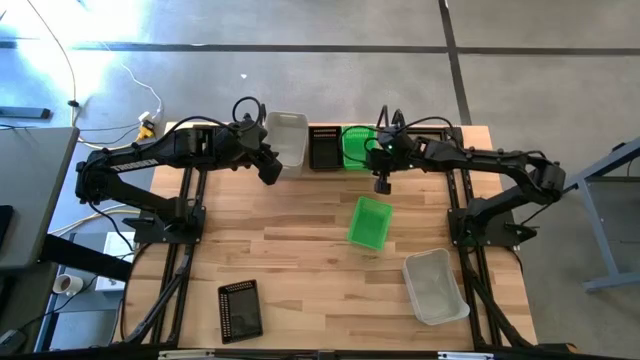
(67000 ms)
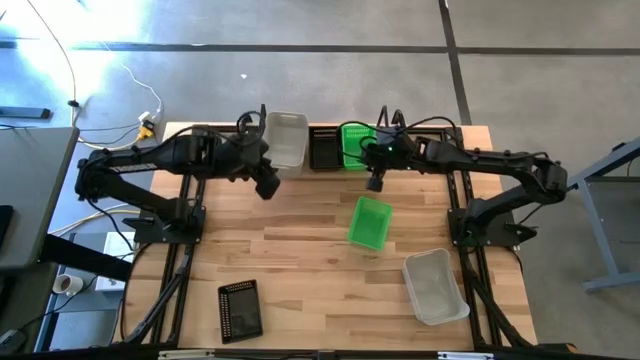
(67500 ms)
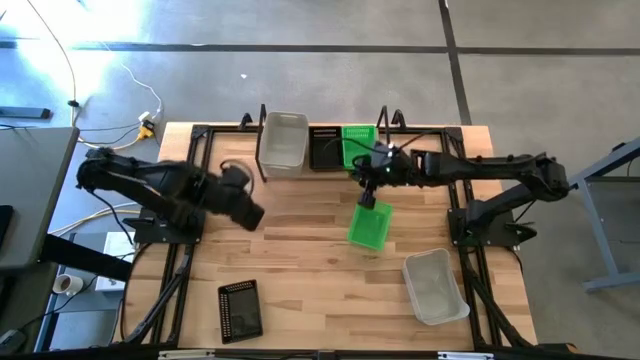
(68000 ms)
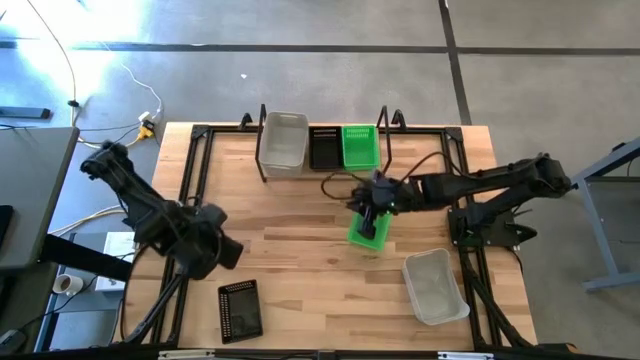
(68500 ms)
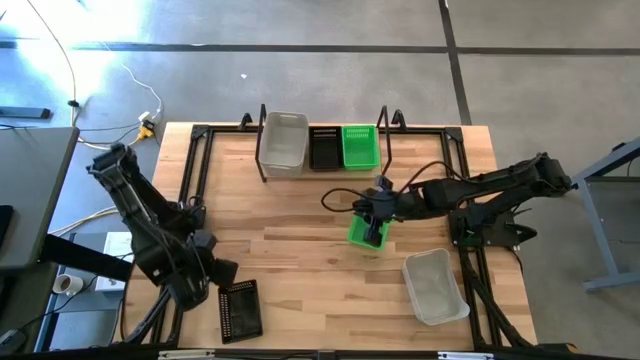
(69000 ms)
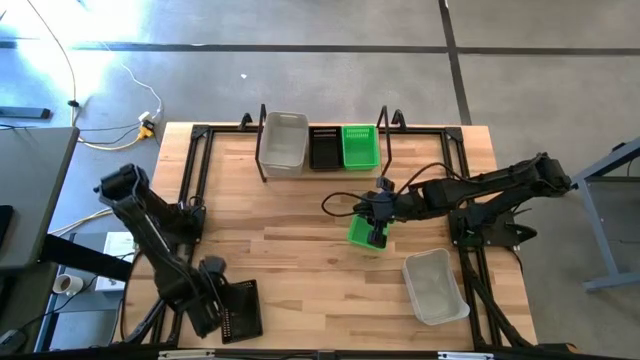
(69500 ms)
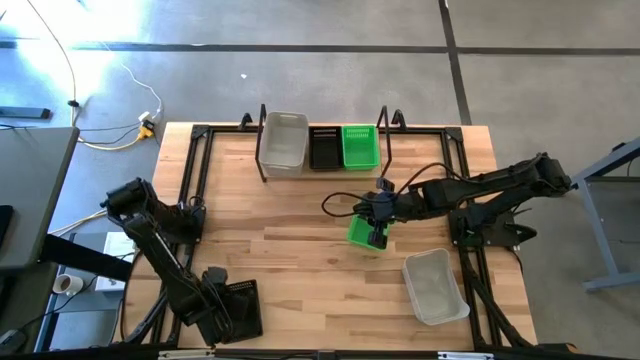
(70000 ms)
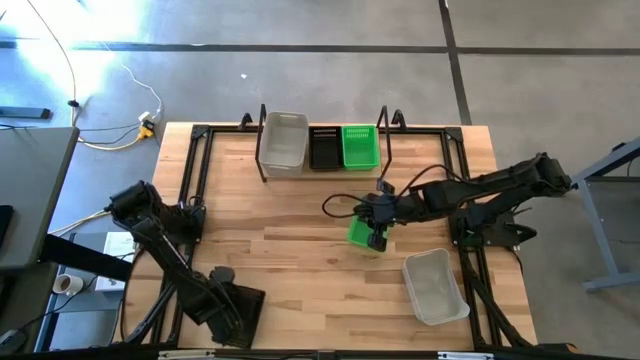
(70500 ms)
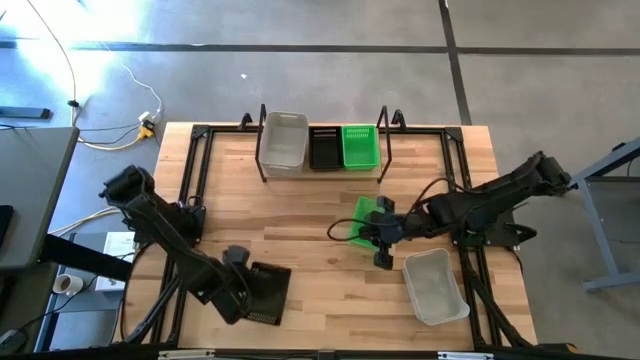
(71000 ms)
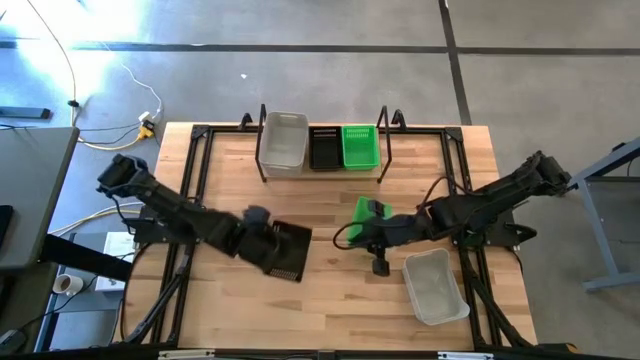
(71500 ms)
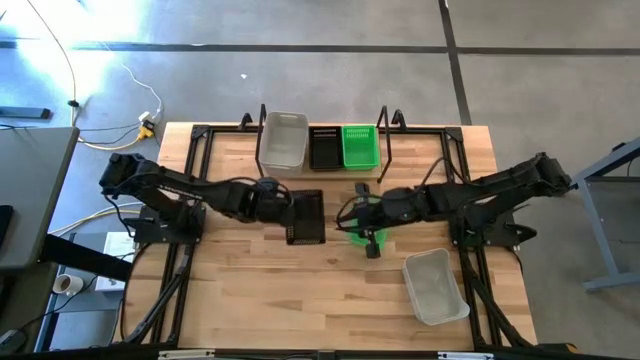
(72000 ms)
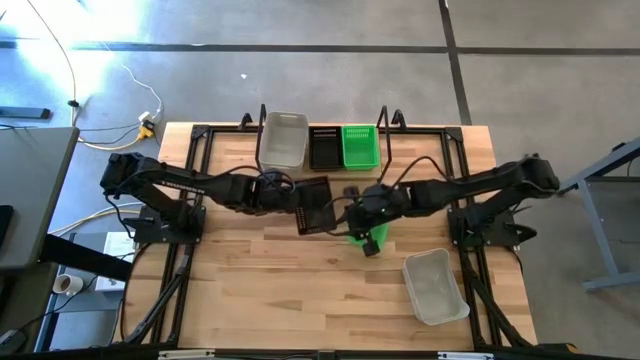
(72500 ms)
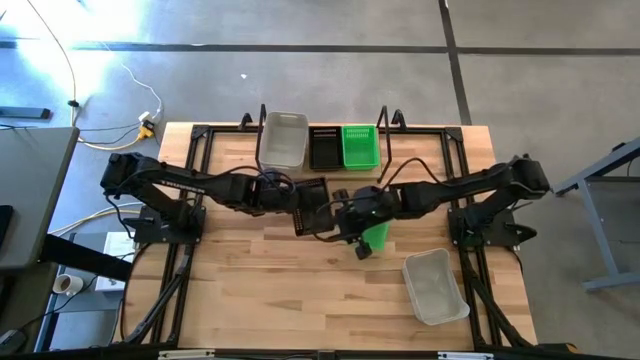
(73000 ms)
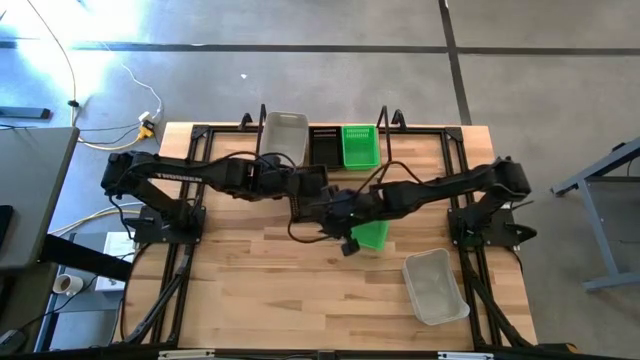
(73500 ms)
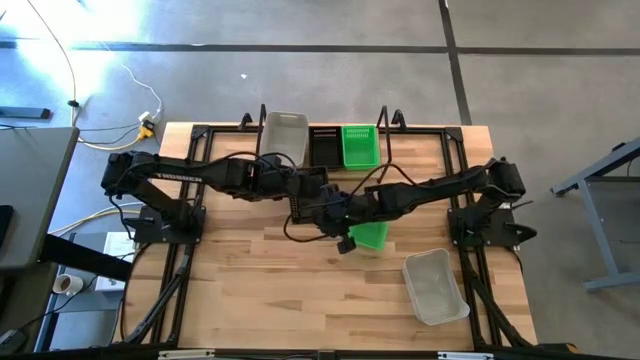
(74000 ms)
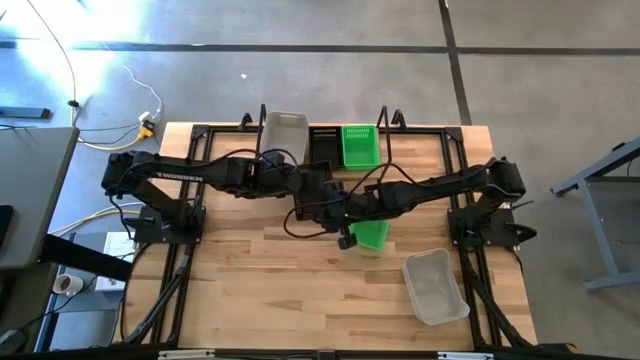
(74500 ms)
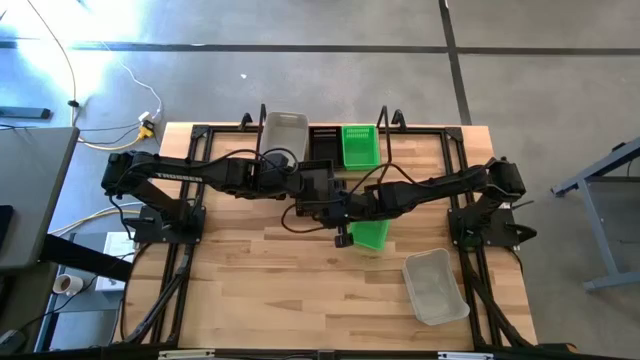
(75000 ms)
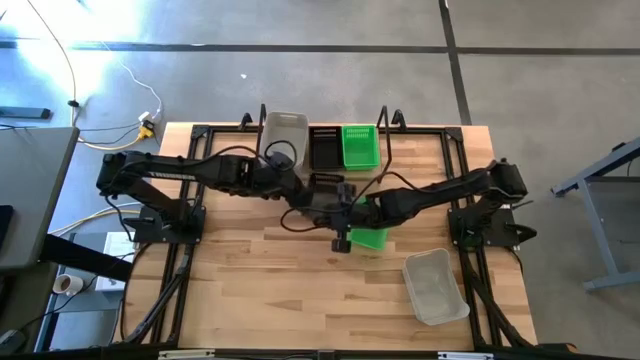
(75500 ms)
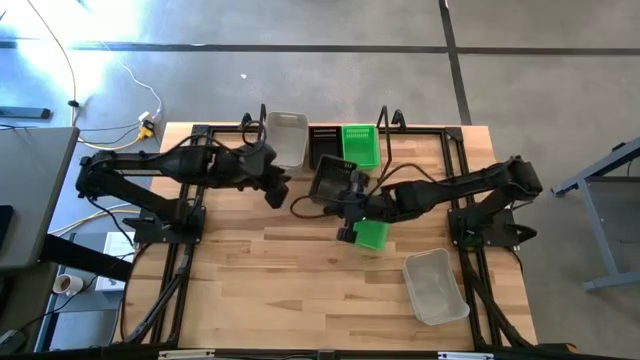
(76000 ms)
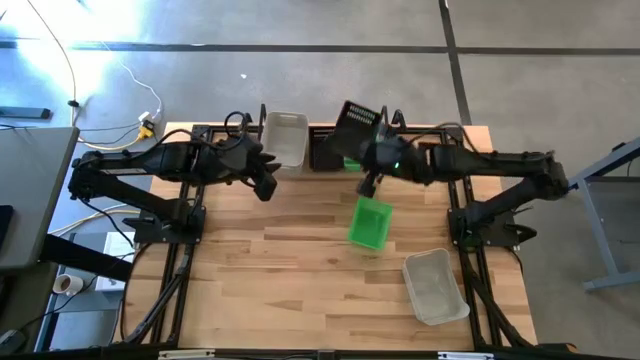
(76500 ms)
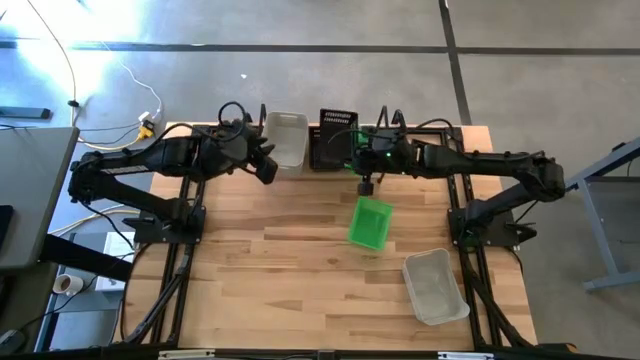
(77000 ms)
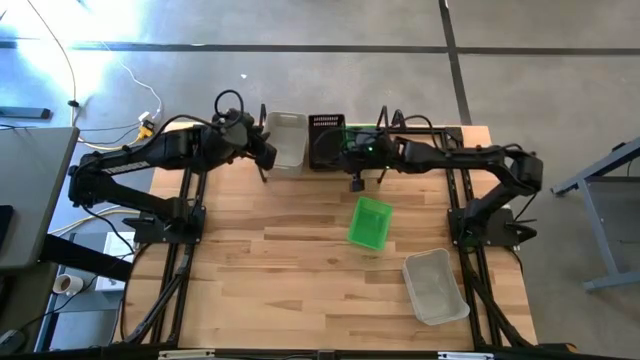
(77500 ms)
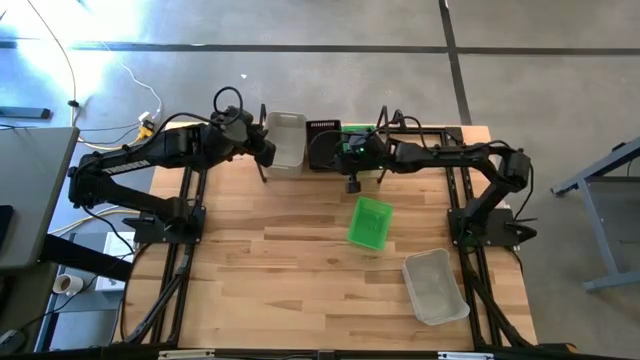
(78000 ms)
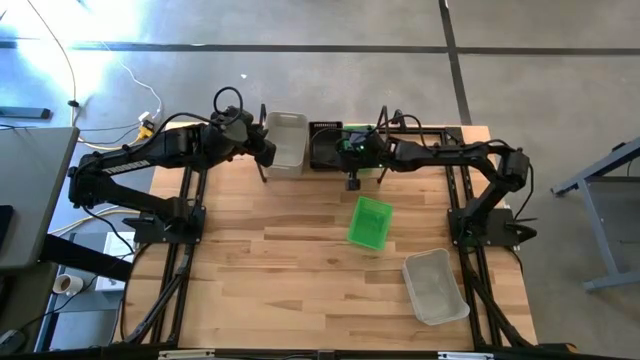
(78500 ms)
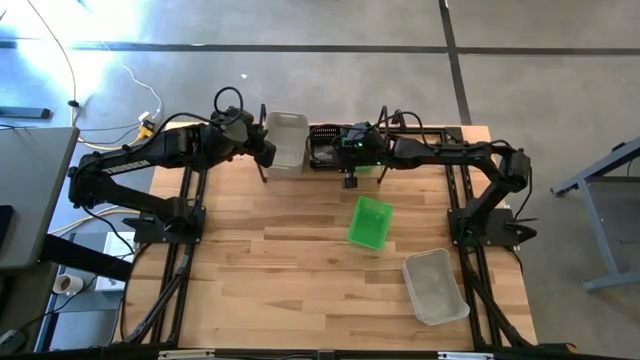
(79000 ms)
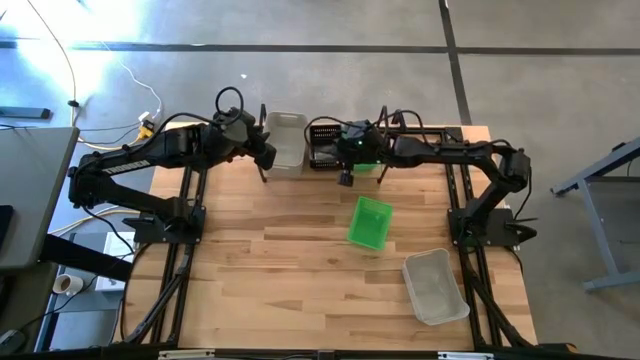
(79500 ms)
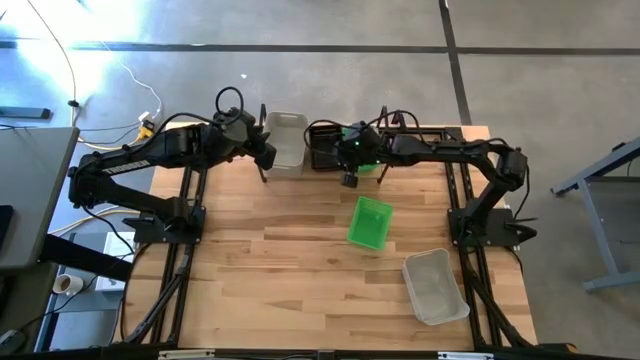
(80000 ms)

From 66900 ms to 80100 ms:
Task: Stack baskets on shelf by color
Stack the black bin on the black bins on the shelf

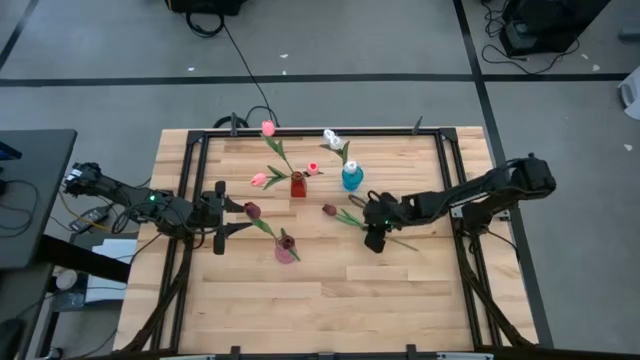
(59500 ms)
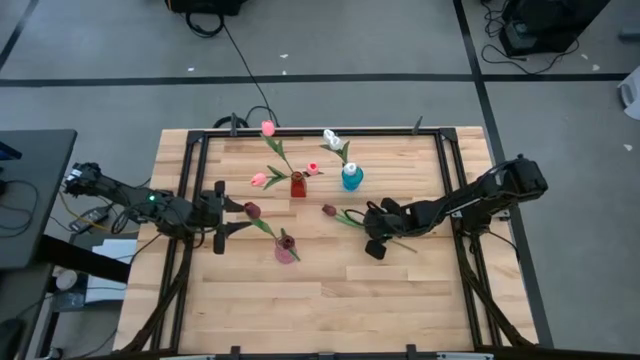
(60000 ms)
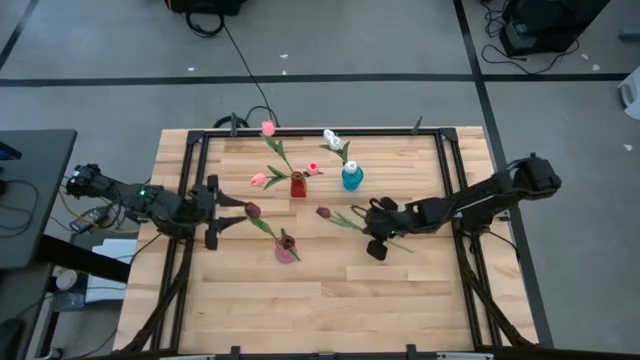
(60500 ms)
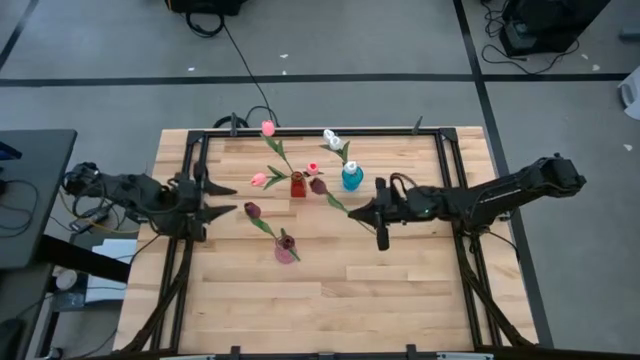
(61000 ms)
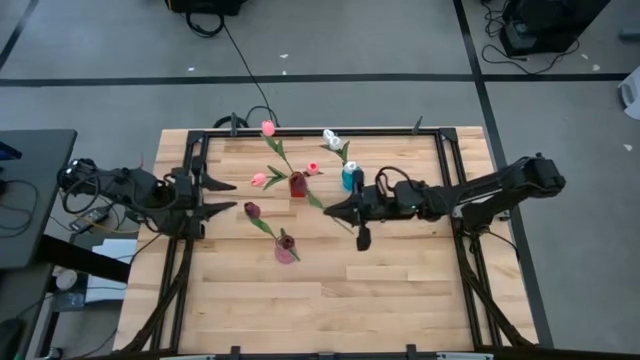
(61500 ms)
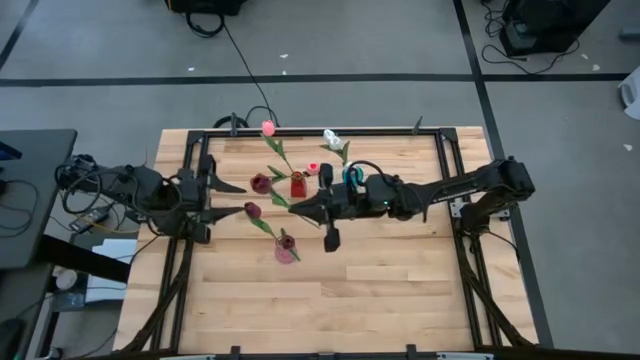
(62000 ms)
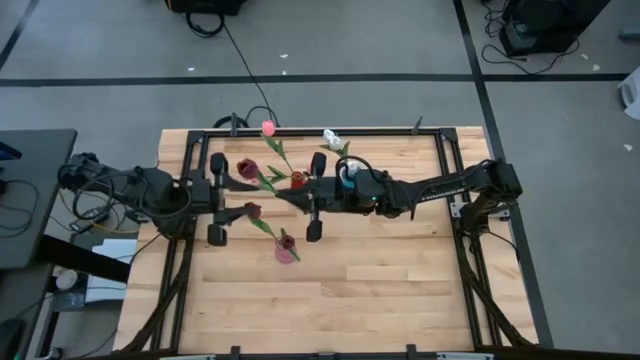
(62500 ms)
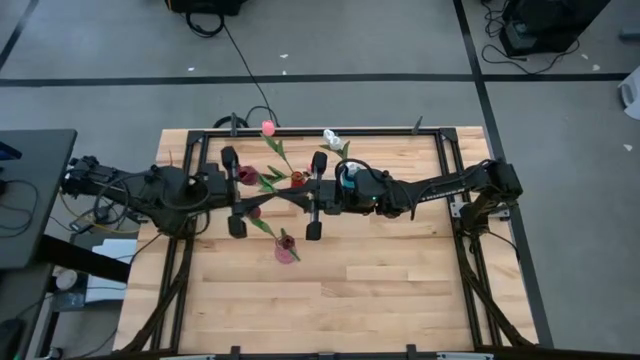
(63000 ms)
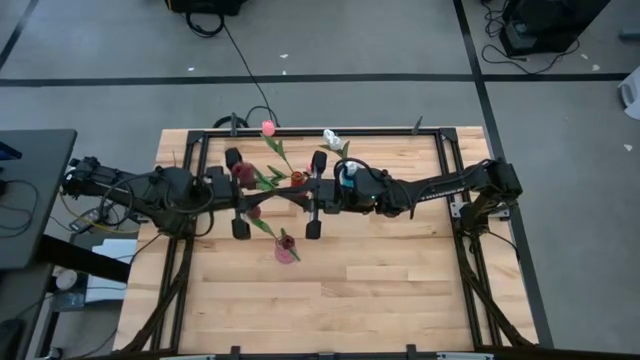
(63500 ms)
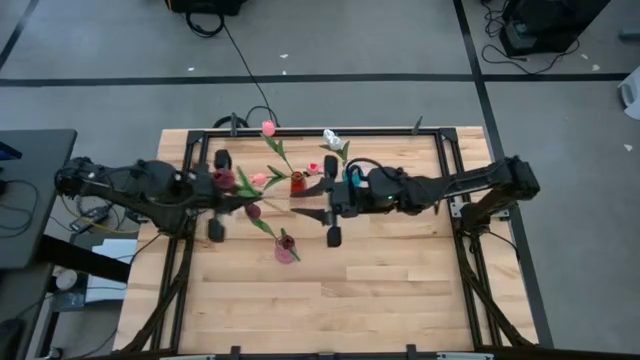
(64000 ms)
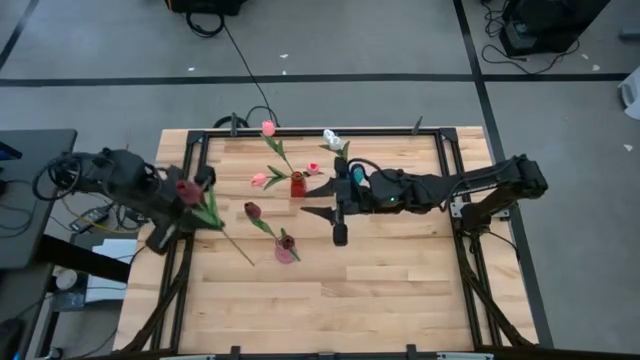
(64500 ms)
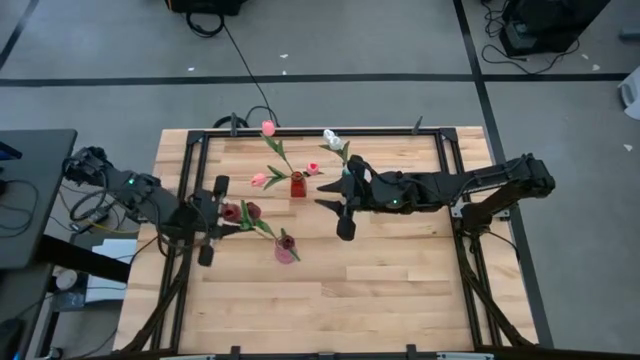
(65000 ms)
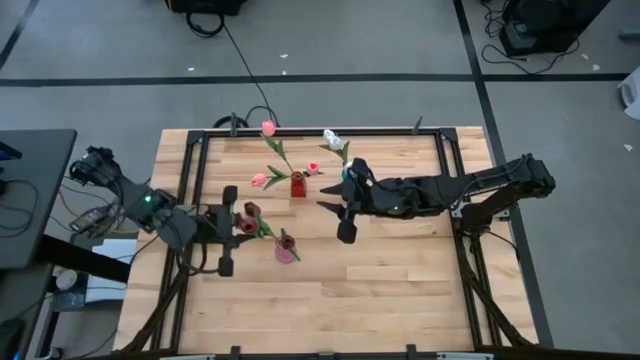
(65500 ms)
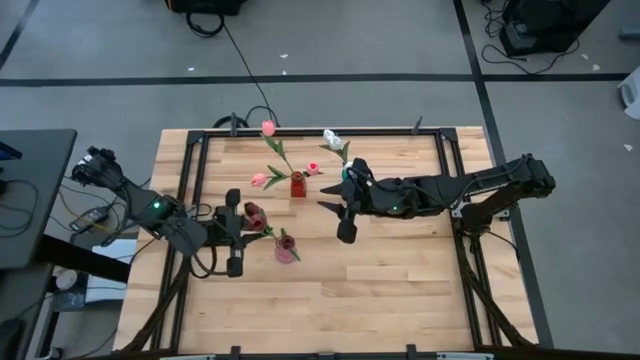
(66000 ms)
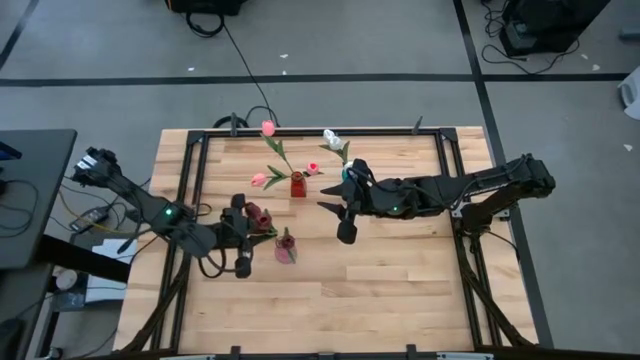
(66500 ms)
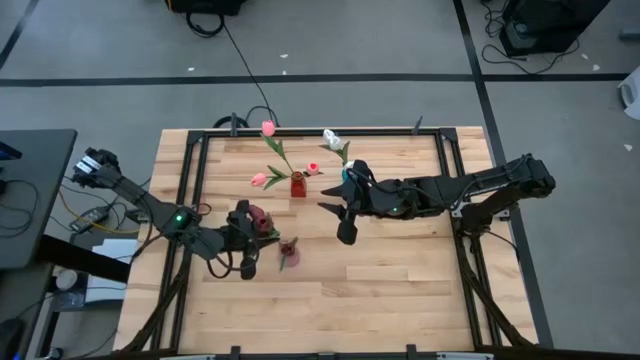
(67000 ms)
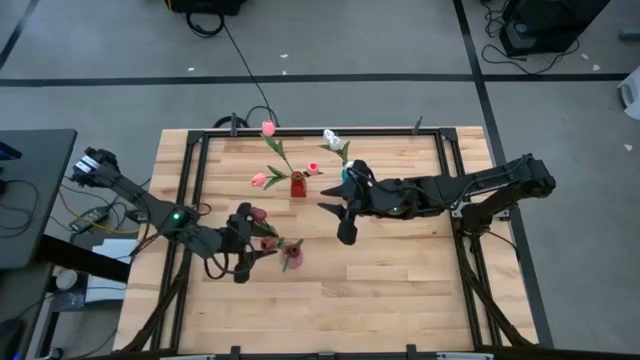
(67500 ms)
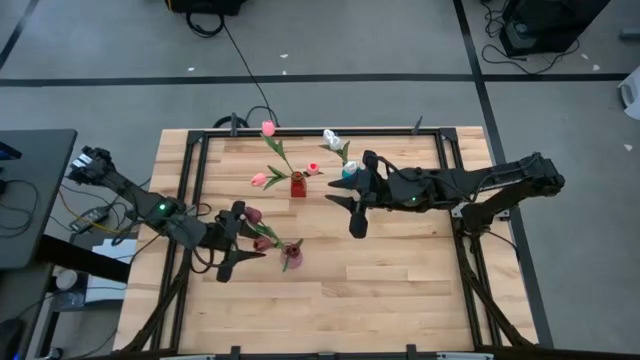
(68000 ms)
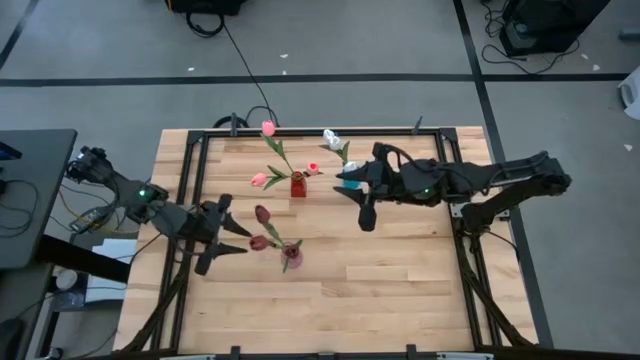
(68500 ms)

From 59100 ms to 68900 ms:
Task: Sort flowers into vase by color
Put the red flower into the purple vase
